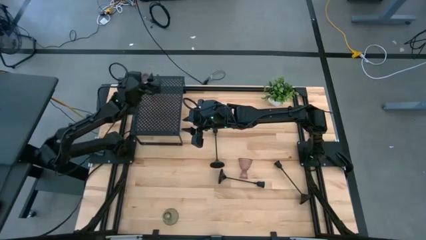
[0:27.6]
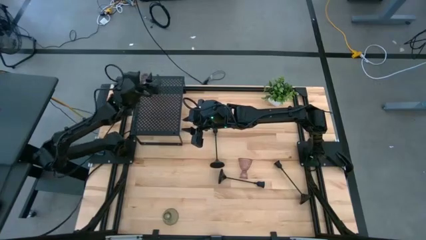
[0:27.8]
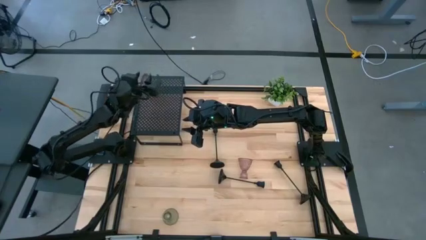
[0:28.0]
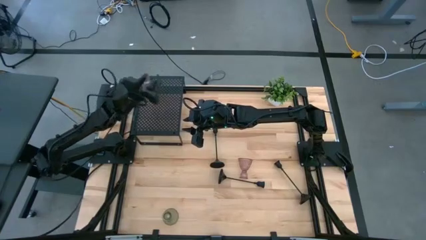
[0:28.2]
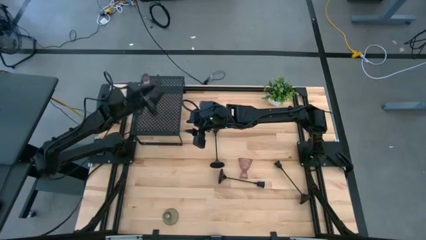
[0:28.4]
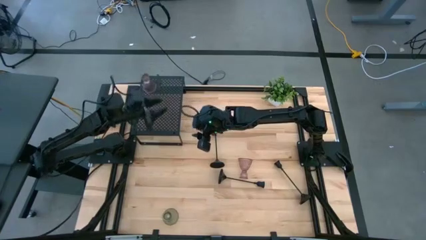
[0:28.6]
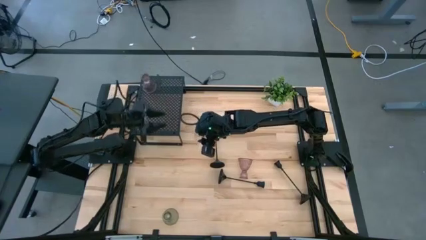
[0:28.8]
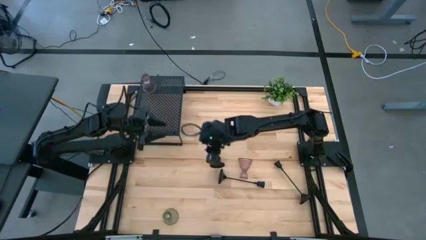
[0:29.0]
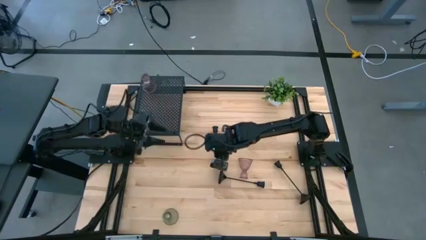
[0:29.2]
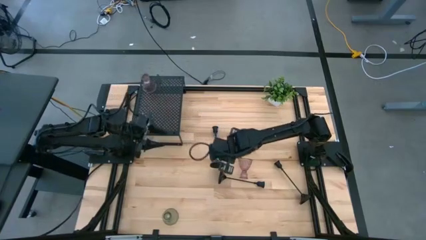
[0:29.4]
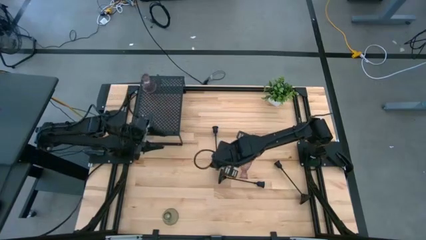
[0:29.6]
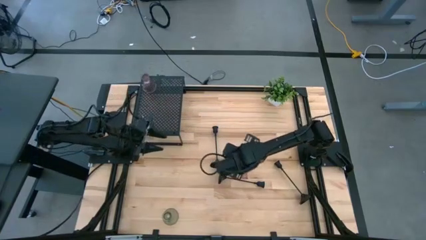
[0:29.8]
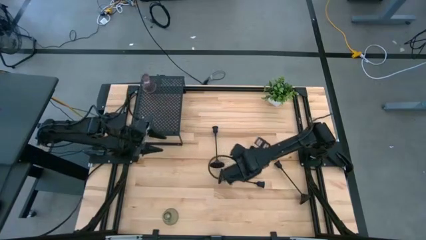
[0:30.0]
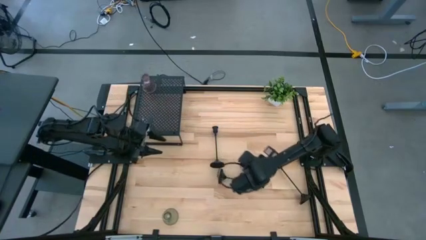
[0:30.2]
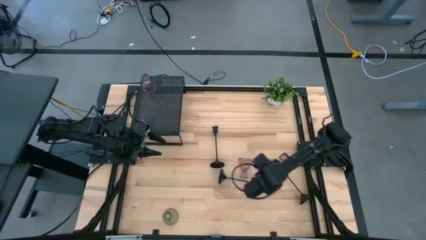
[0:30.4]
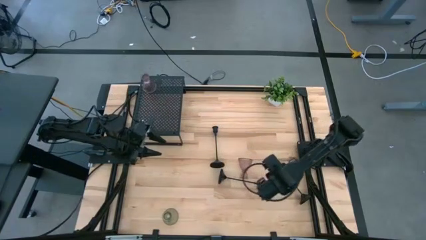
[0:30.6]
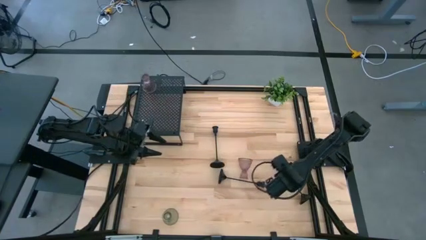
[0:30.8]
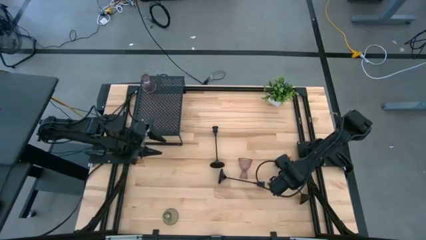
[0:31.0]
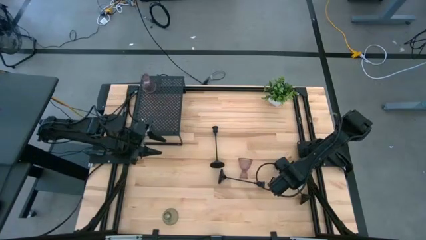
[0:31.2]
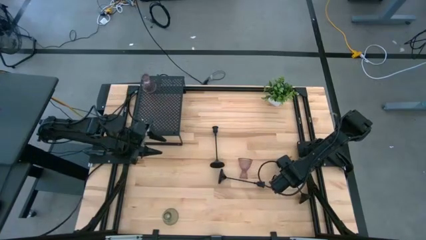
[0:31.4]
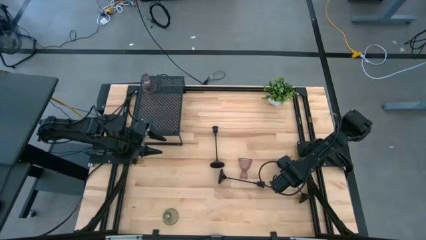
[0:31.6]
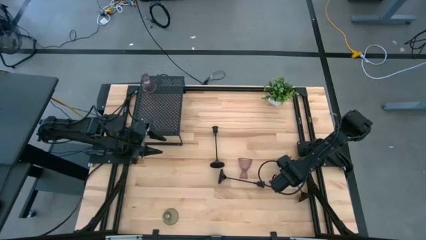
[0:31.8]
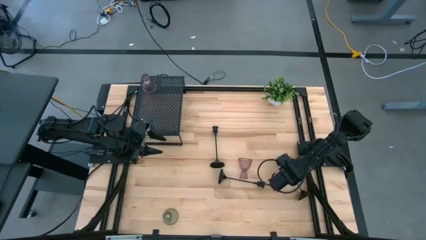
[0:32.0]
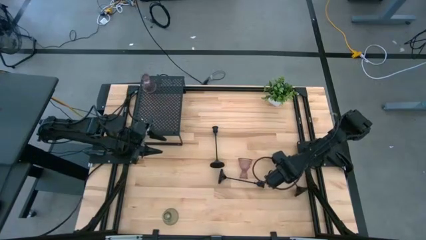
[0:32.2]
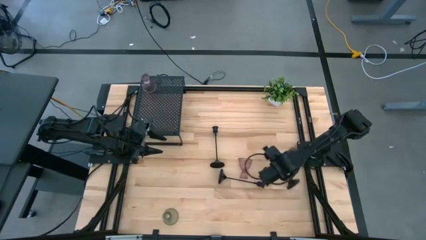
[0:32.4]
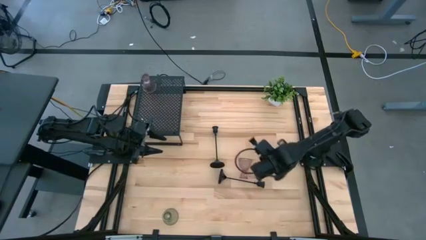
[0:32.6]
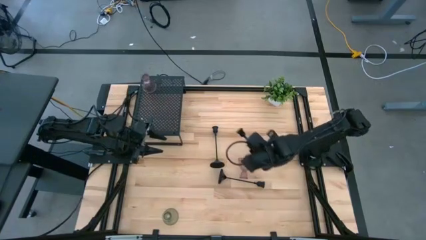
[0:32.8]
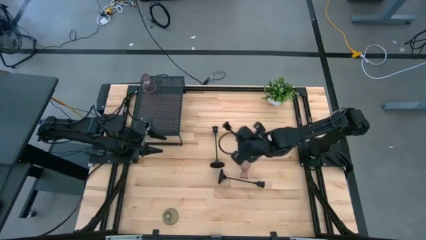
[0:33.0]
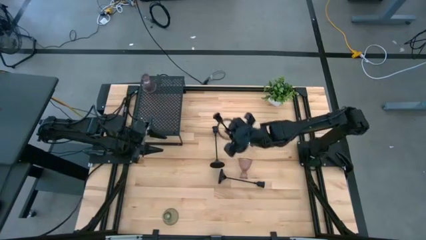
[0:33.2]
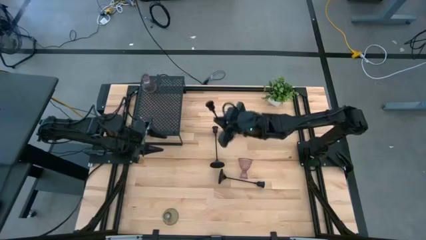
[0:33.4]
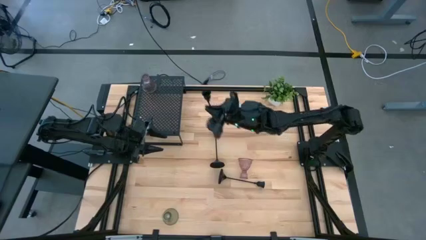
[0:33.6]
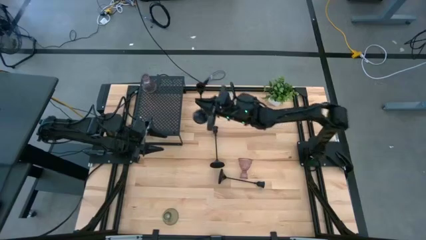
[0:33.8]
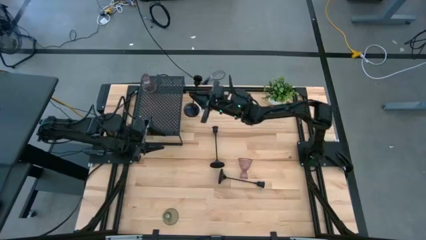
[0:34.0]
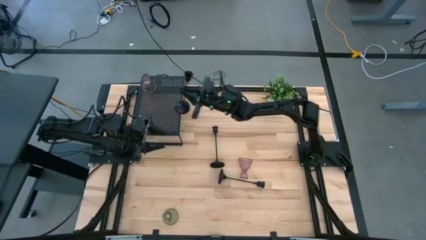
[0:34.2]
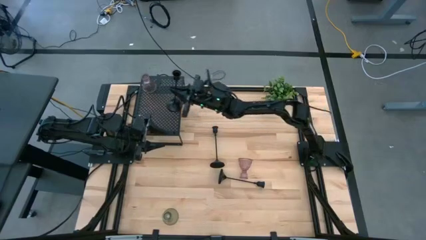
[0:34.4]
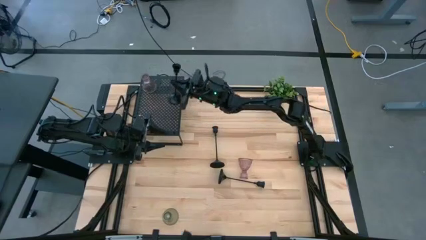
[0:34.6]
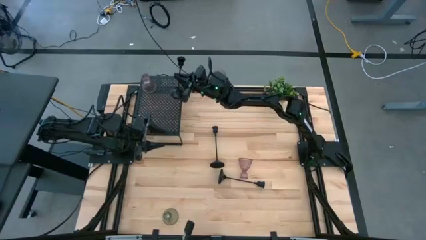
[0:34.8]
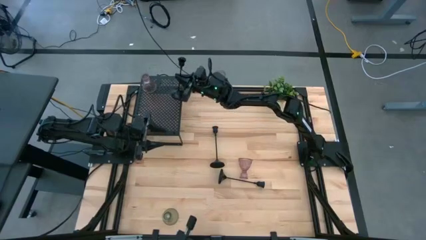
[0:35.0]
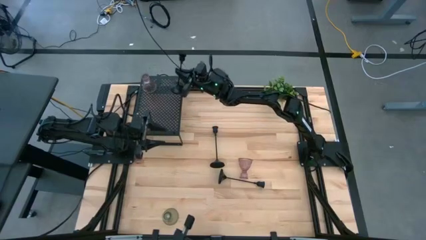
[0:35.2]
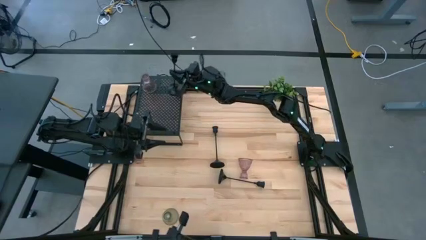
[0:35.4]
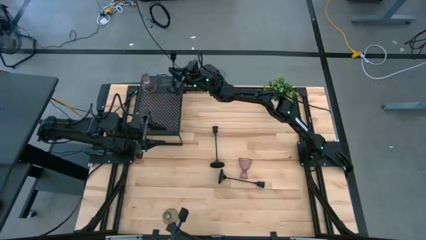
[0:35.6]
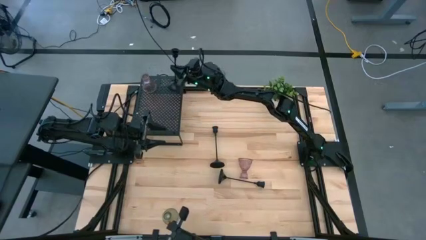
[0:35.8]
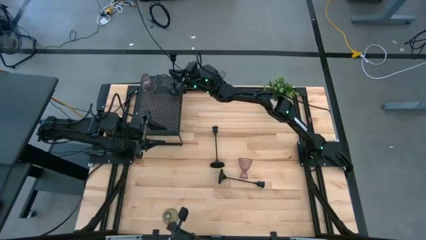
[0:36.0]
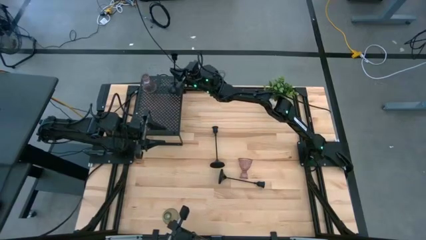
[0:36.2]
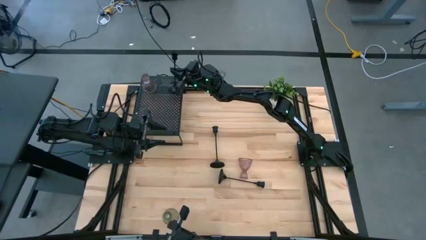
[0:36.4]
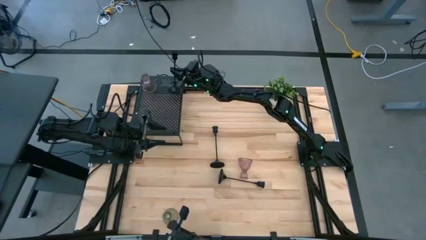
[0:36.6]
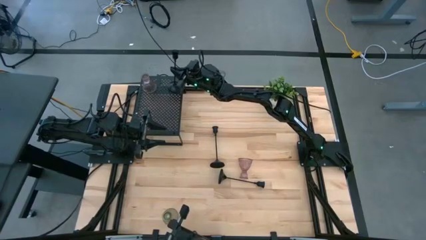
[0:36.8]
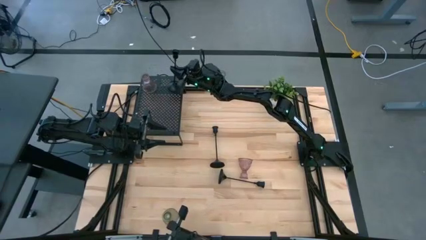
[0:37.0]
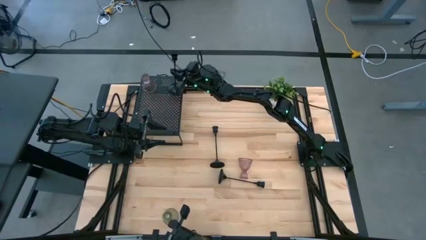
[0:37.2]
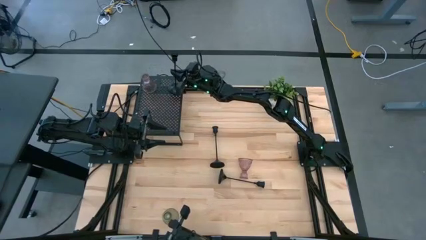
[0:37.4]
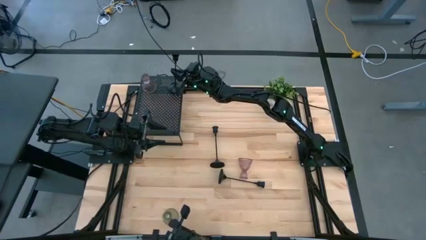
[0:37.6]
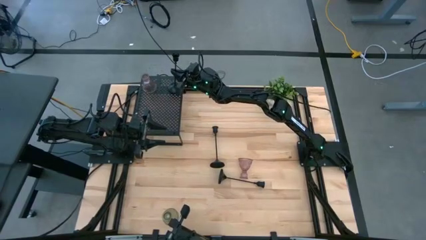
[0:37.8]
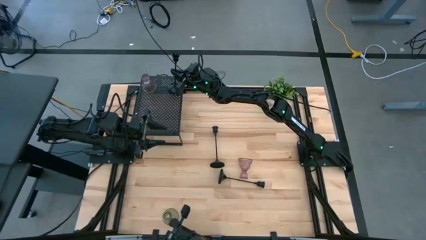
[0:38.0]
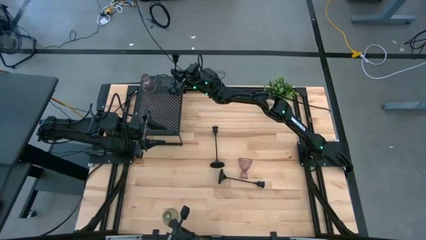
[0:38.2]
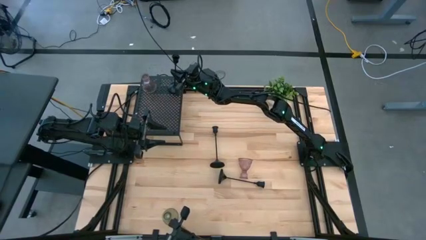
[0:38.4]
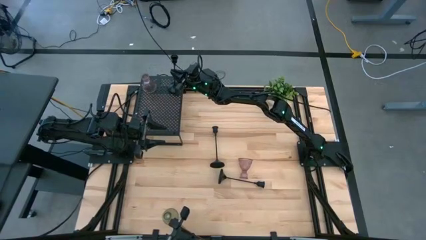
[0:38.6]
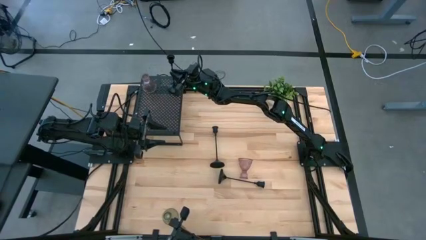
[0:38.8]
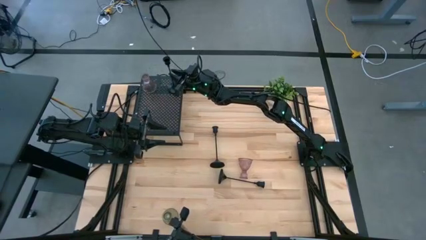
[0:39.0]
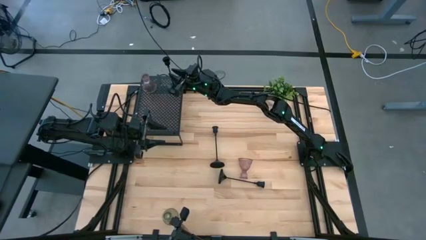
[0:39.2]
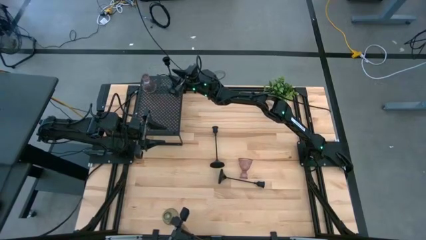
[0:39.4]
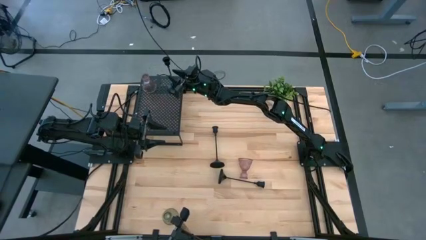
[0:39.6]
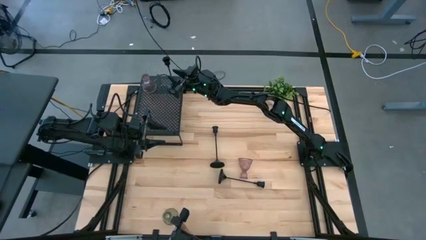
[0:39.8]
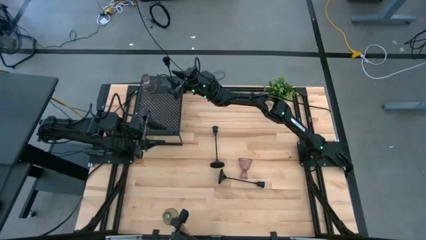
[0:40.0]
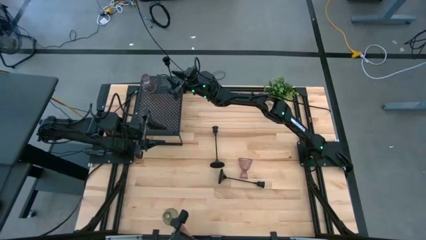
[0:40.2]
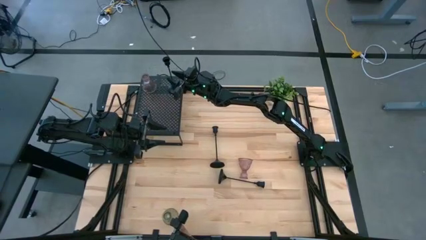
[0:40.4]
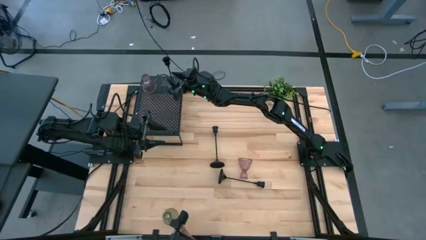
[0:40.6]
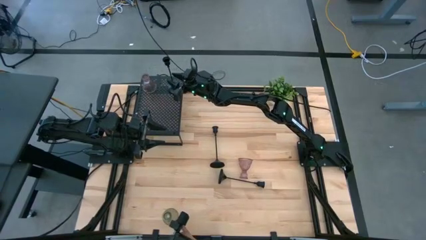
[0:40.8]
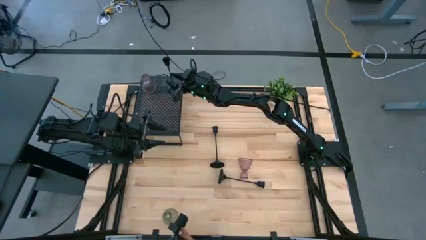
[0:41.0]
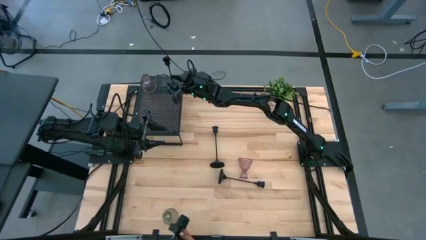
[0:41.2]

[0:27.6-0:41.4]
Task: Pick & Place candle stick holders
Put the bottom right black candle holder on the shelf

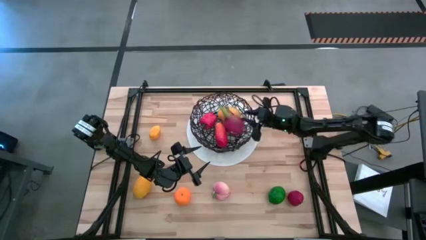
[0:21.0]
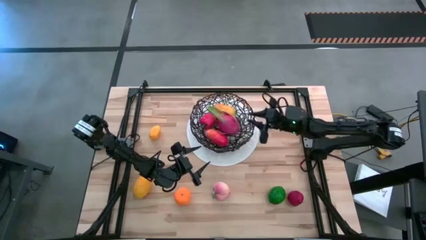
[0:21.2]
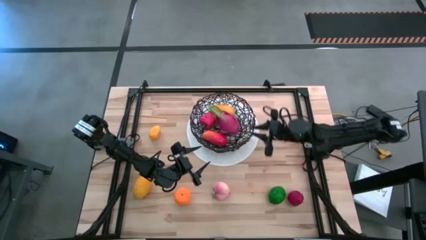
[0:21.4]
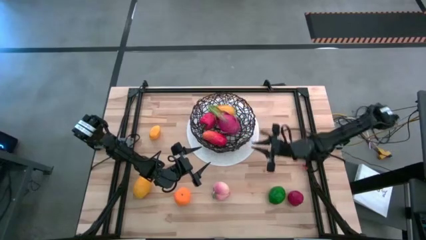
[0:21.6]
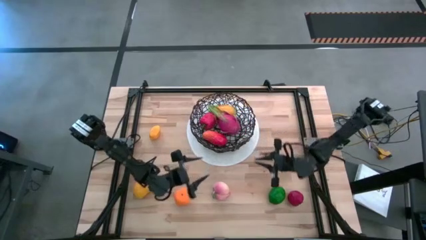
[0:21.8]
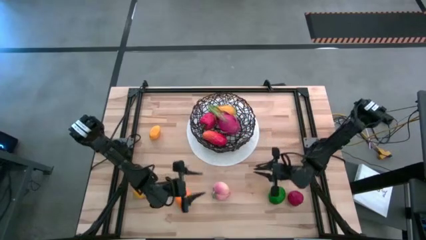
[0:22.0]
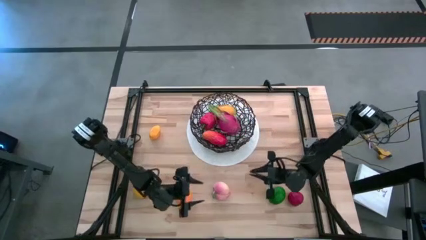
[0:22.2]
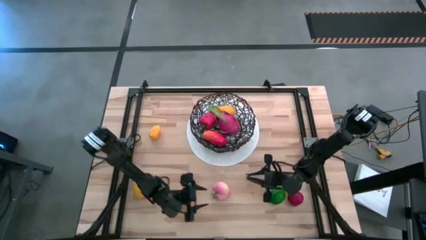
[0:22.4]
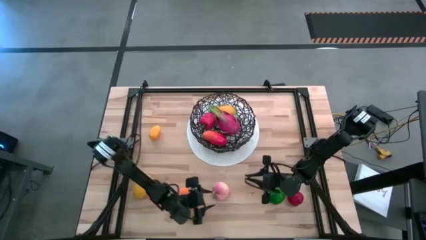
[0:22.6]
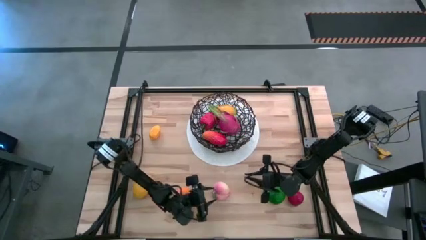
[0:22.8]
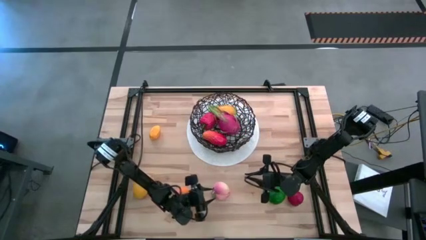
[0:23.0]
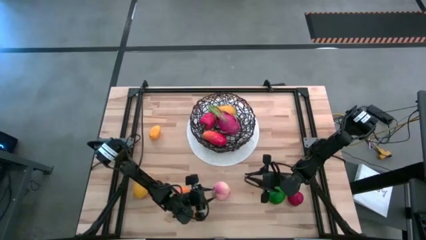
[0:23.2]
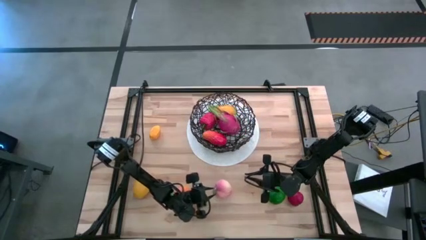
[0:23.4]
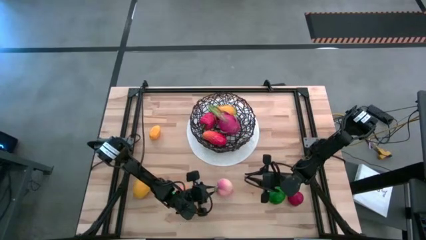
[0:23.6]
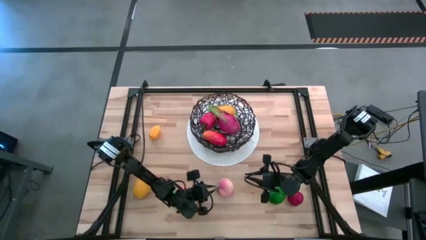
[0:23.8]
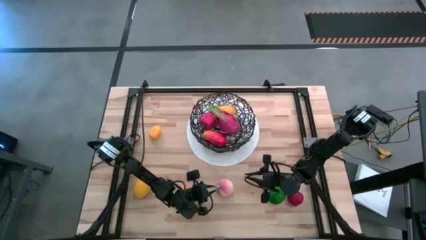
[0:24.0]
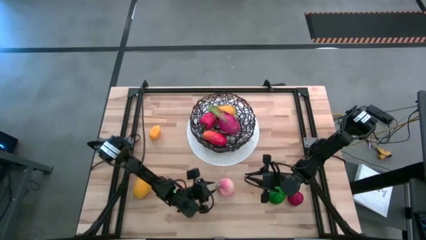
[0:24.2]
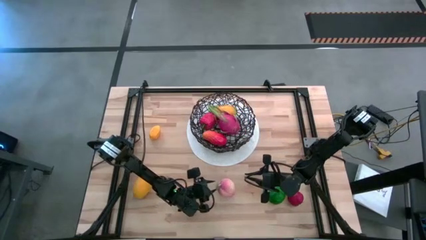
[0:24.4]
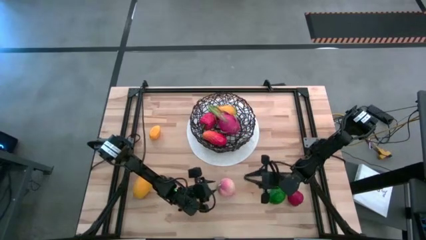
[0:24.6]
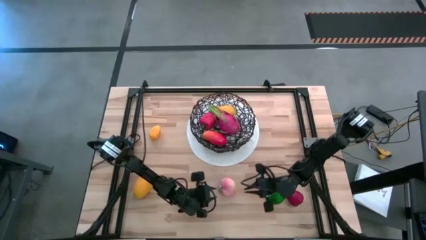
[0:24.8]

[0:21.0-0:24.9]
Task: Build produce basket
Put the peach into the wire basket
